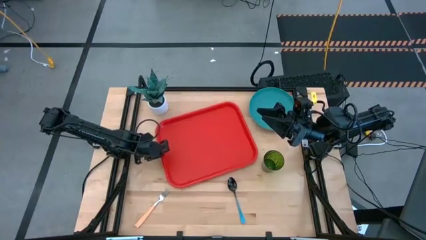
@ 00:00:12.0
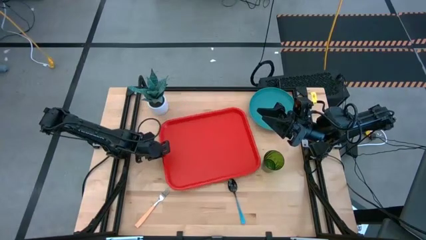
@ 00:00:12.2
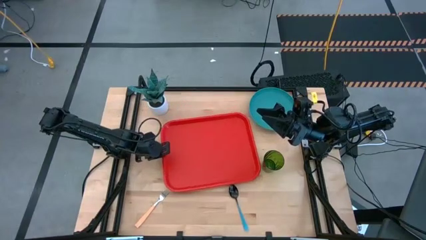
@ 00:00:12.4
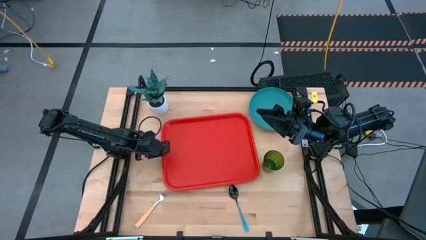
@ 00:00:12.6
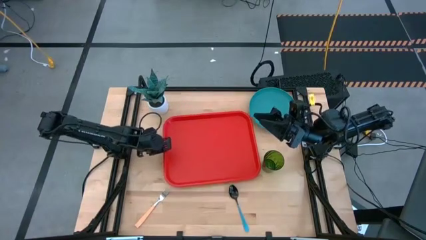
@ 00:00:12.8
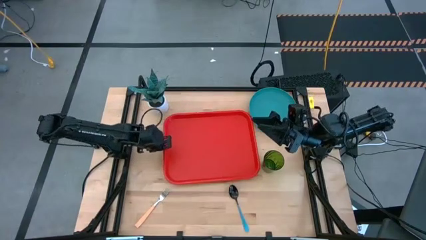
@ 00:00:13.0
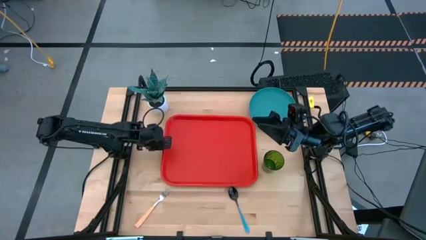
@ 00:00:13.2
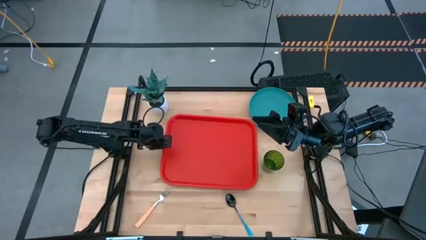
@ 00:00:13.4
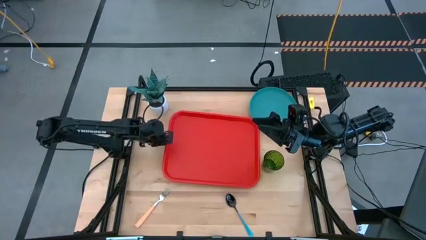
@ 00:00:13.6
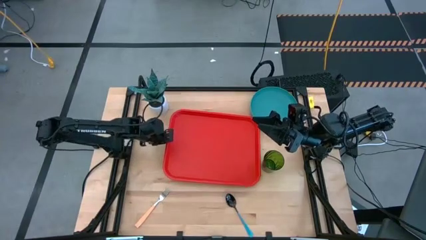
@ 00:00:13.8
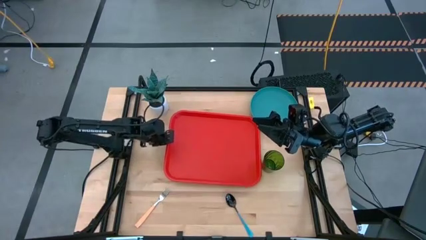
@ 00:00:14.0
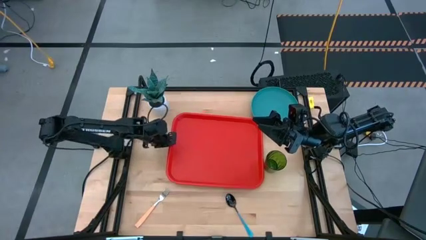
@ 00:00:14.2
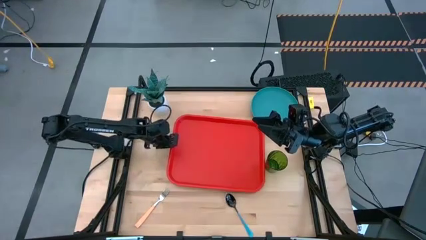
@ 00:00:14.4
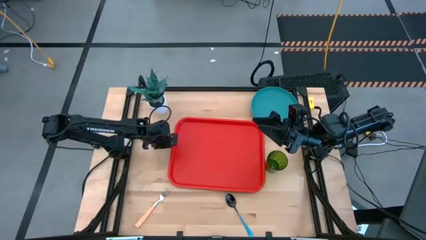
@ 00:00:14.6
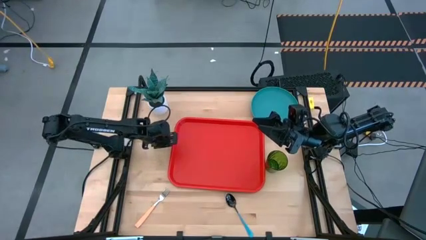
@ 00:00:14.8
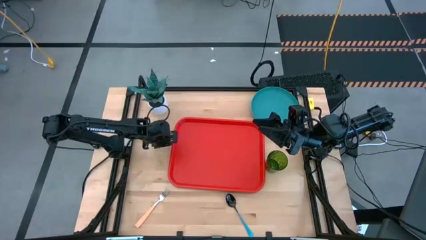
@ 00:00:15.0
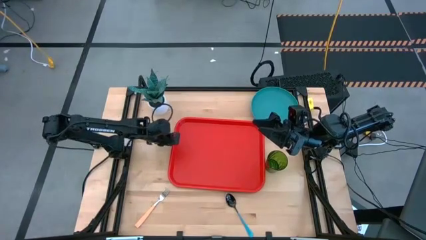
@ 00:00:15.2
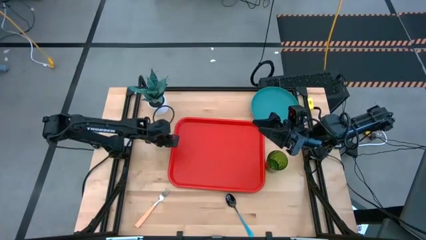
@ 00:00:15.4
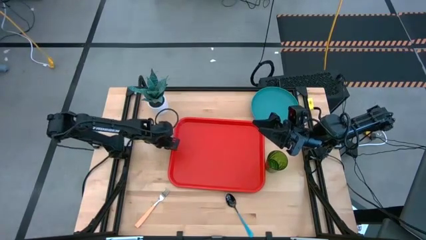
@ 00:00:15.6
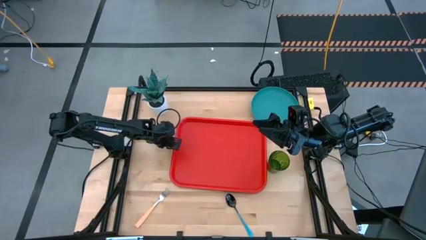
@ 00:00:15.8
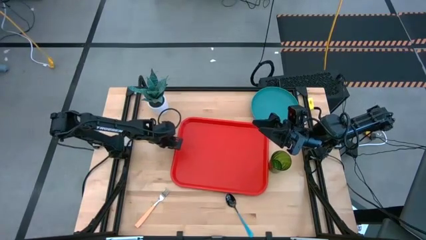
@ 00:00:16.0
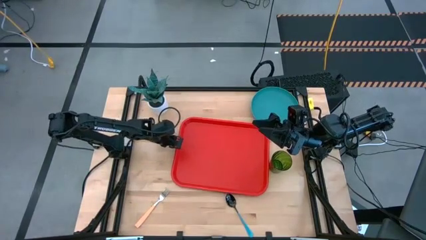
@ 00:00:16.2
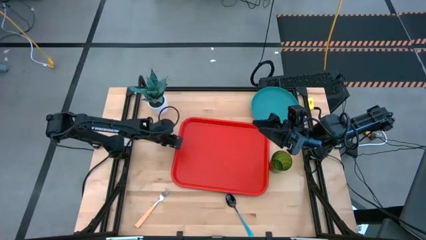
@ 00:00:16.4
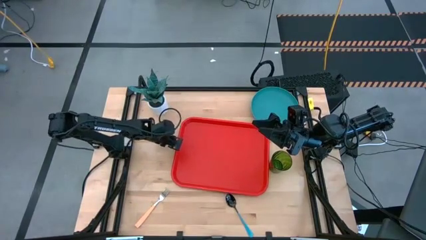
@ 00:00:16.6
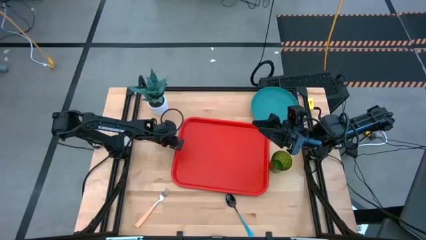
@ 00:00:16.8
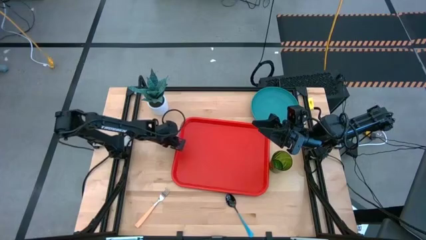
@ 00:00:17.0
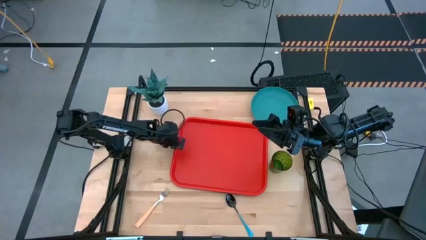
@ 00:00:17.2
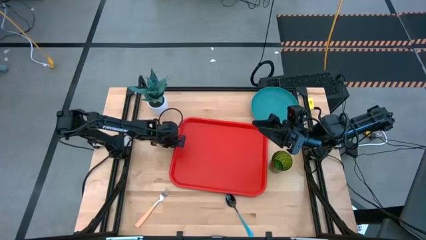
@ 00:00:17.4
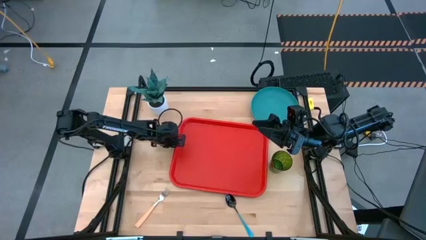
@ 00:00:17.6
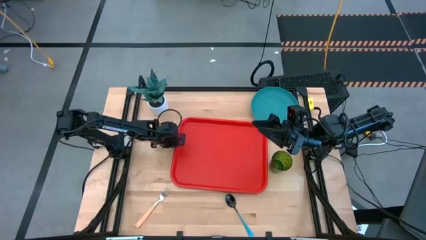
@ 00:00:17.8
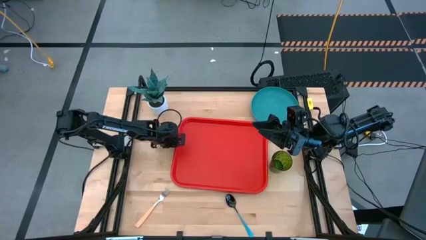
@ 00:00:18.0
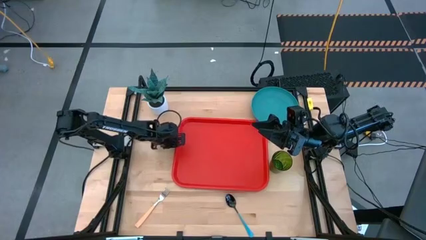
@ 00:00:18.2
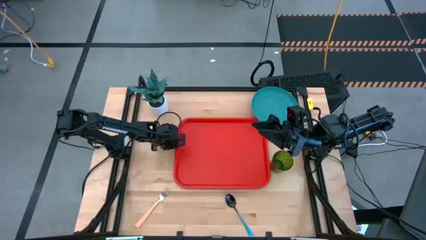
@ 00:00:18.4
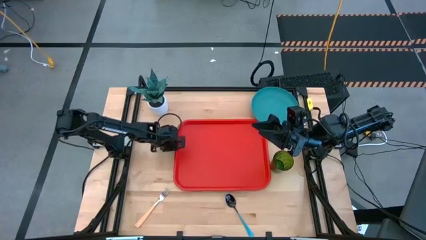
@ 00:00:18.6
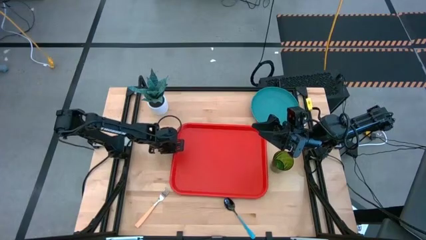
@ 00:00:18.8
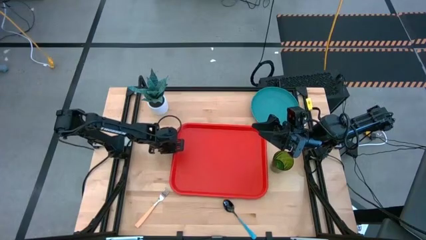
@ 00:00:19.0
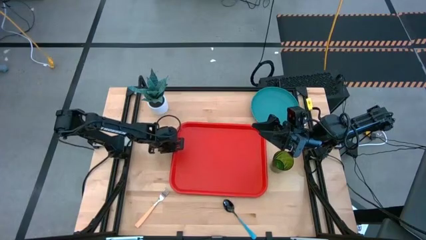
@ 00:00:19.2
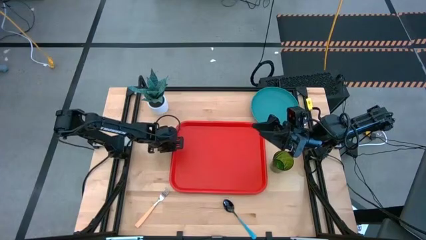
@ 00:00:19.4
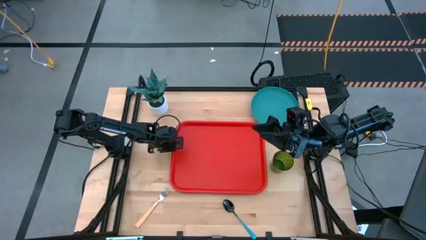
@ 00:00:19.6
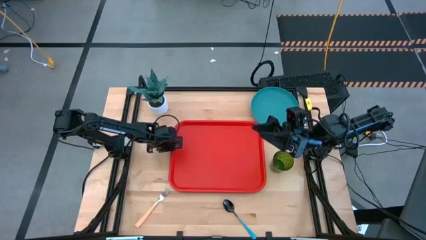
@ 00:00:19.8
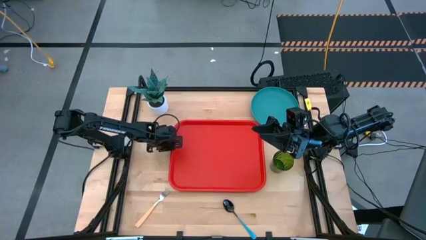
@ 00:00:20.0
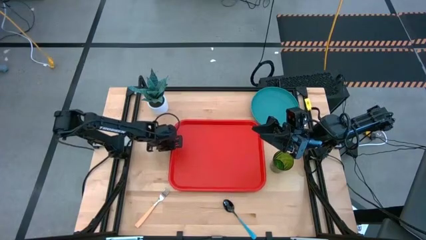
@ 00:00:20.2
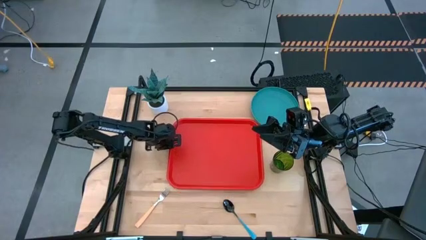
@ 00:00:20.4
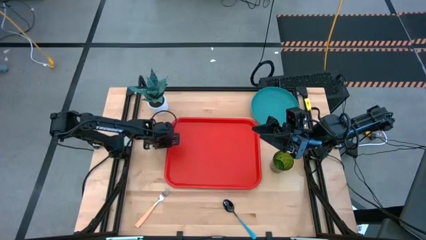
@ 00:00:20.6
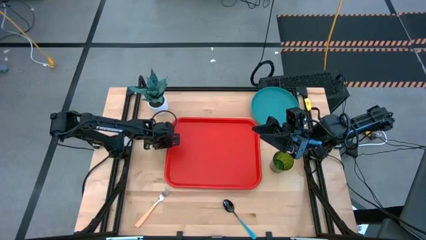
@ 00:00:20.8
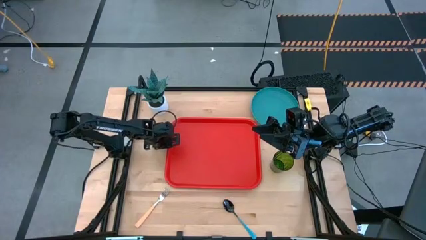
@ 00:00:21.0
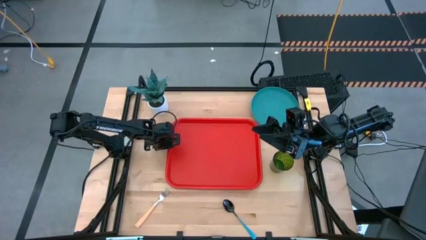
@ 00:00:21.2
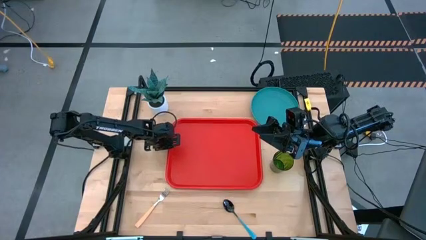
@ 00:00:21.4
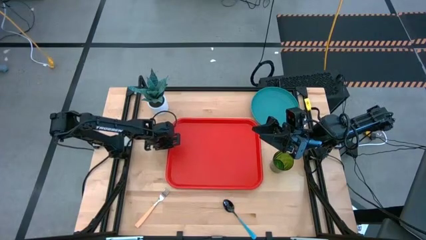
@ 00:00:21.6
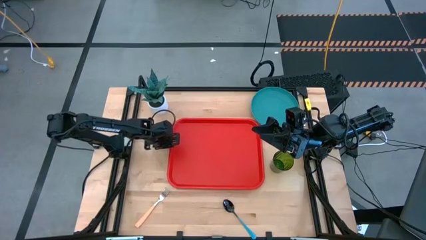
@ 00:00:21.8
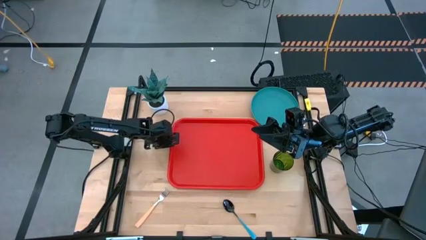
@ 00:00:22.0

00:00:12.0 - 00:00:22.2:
Task: Pick and place plate/cup/fork/spoon on tray
Move the red tray to the center of the table

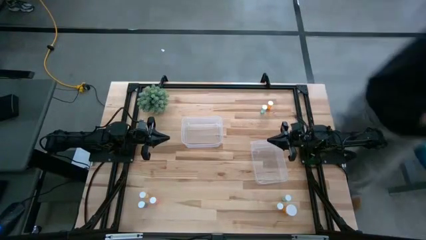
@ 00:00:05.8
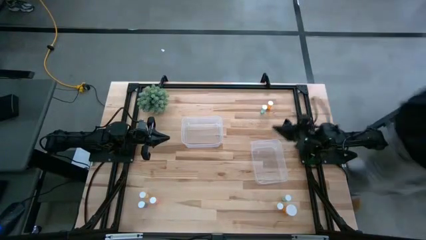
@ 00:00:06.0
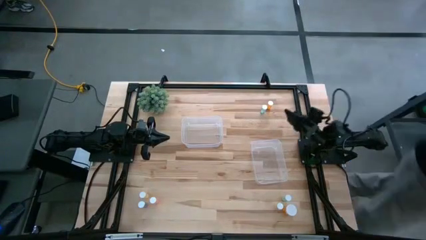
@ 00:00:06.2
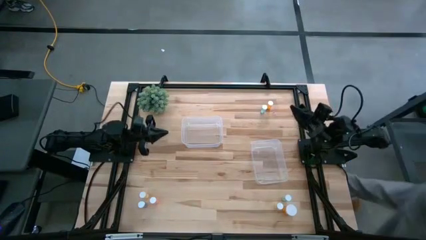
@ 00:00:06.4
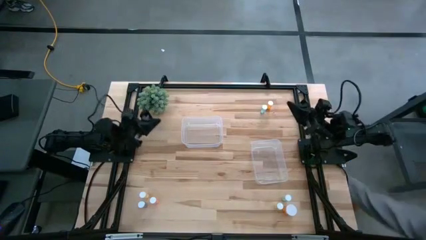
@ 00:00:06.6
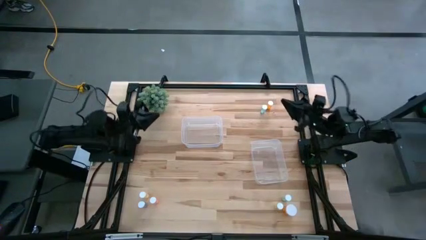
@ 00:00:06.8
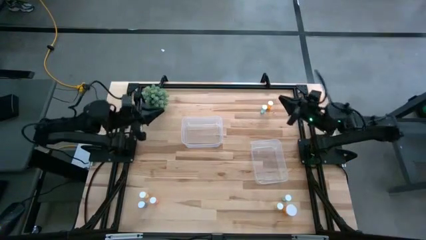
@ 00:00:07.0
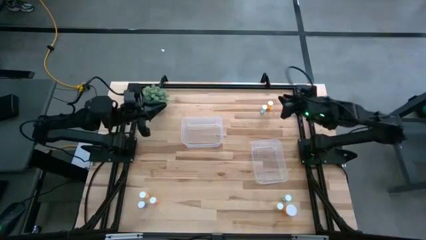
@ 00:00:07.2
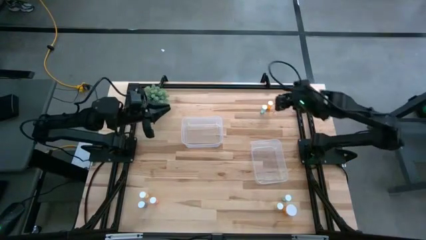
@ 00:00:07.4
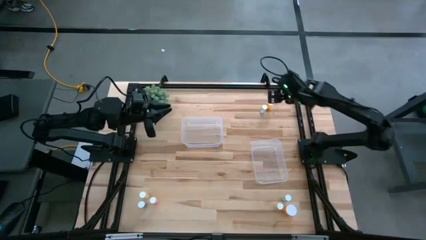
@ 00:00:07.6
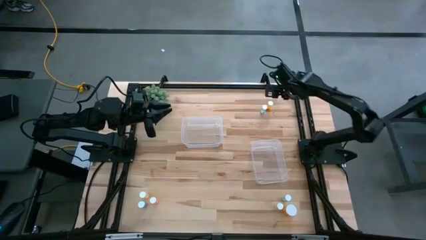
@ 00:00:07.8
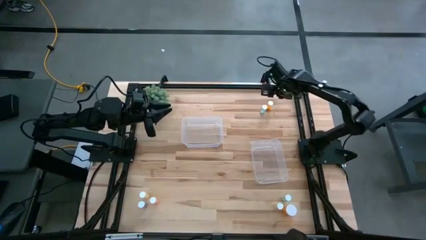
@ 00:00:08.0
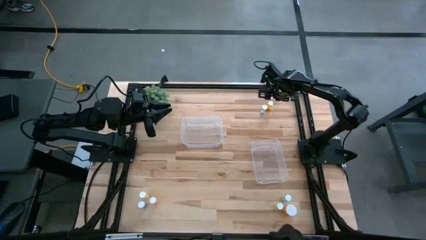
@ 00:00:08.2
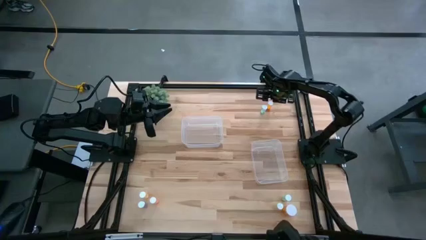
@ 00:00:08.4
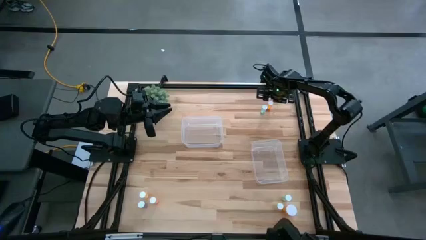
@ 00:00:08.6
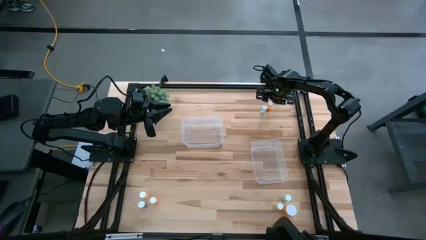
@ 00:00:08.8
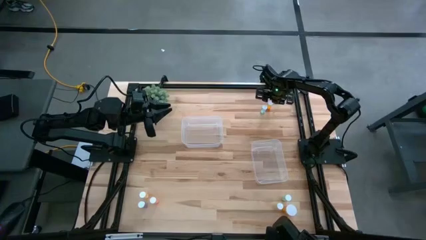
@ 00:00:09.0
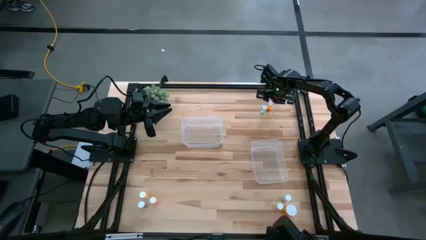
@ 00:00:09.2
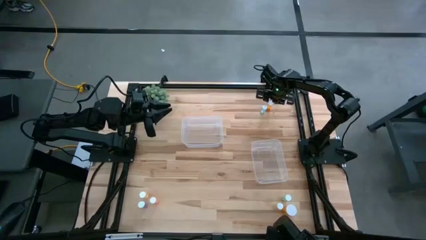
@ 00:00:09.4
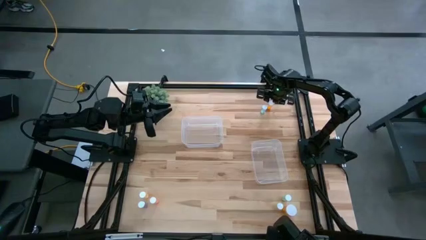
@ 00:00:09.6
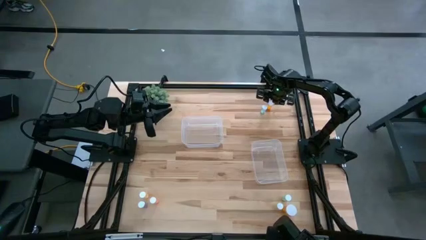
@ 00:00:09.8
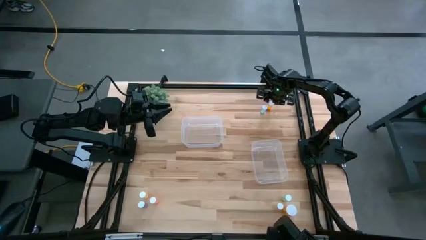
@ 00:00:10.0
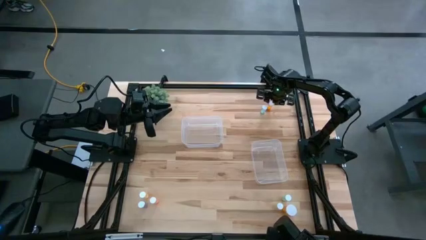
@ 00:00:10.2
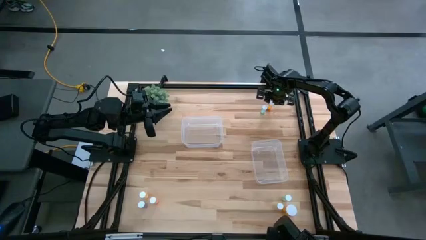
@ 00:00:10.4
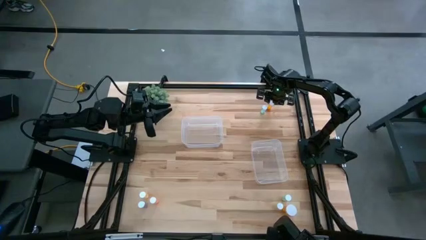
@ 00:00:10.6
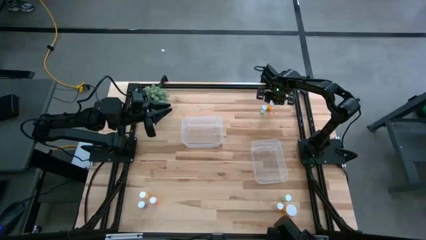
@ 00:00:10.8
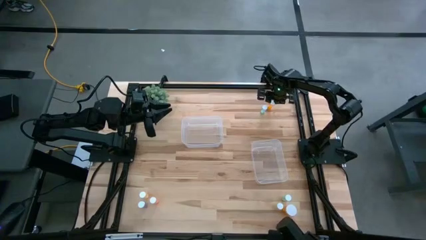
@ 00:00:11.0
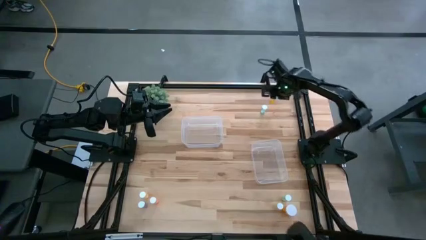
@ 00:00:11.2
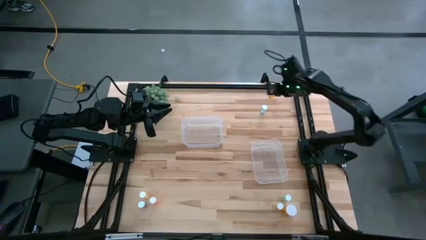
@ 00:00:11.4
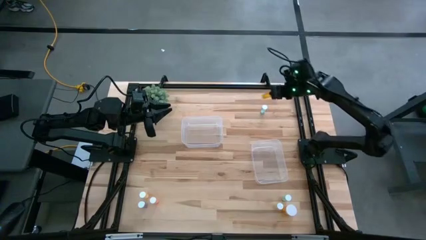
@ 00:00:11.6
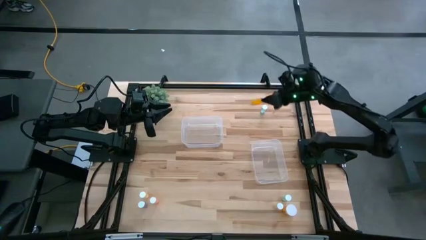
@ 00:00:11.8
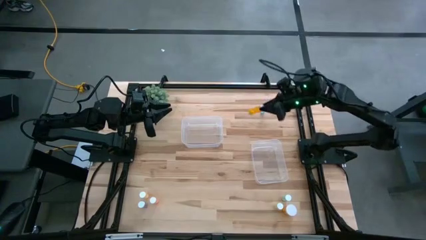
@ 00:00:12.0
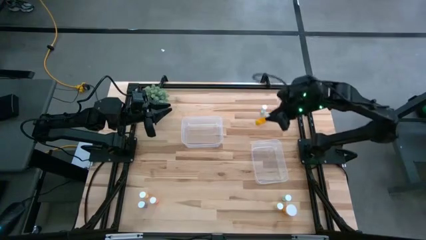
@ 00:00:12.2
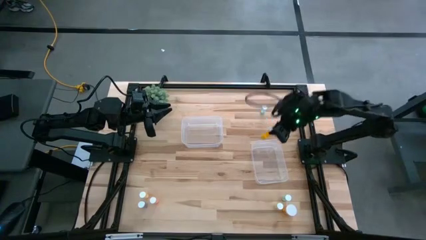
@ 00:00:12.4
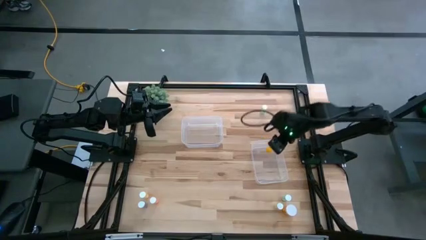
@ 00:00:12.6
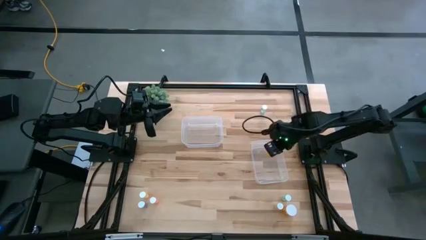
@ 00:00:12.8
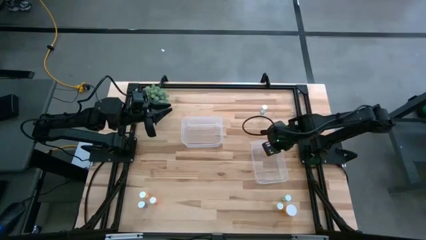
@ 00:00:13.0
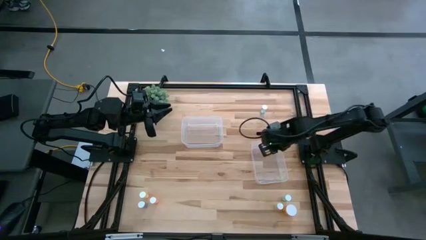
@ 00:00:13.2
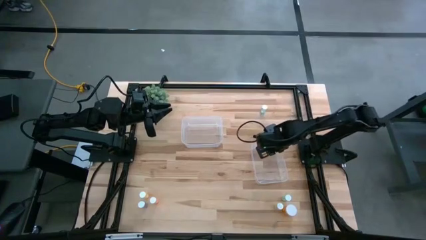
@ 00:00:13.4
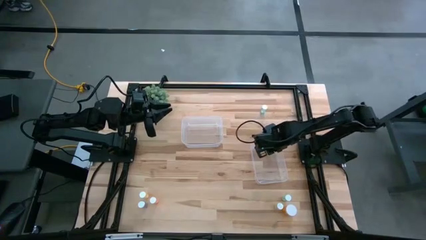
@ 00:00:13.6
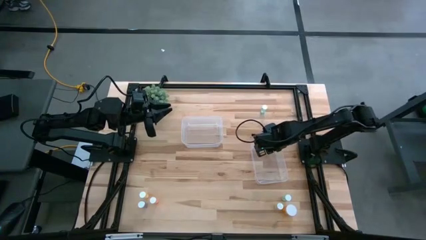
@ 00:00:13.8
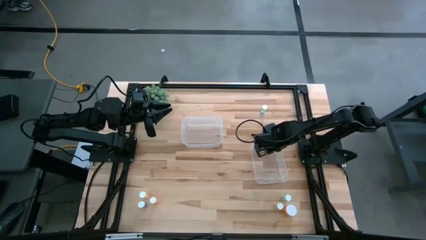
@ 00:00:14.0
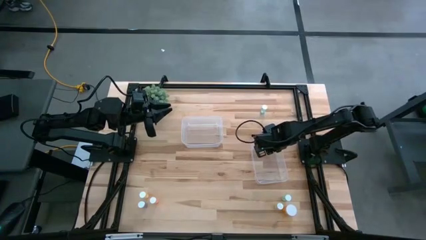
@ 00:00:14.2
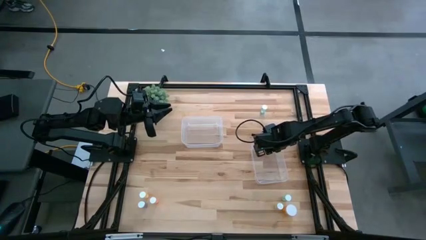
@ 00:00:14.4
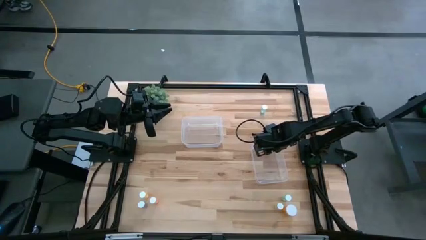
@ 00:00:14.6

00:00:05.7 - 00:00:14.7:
Task: Pick and place medicine bottles into bin by pill shape (circle, oval)
Put the top orange tablet bottle into the bottom transparent bin
